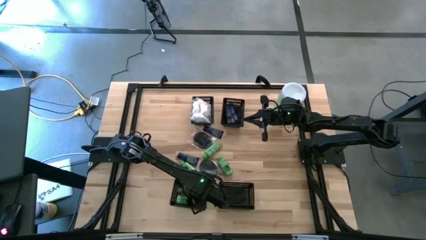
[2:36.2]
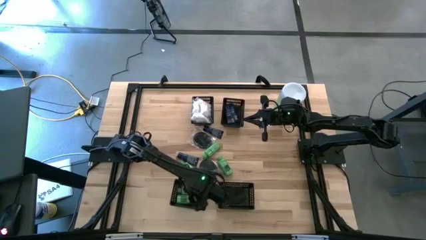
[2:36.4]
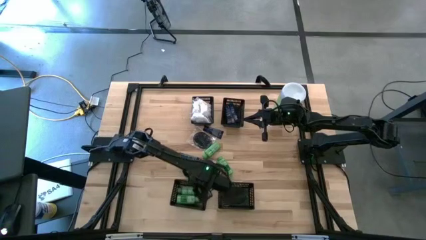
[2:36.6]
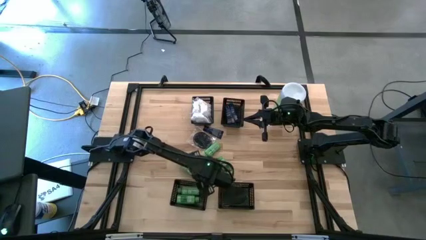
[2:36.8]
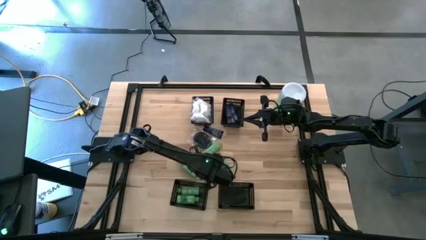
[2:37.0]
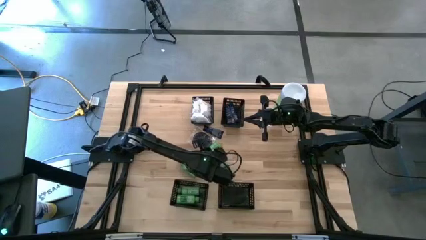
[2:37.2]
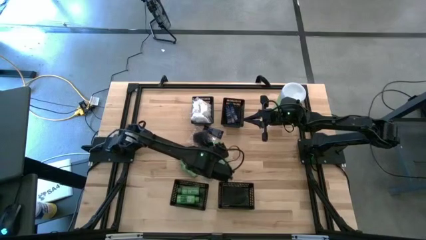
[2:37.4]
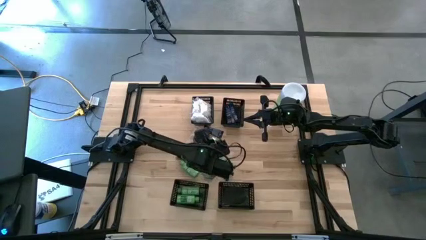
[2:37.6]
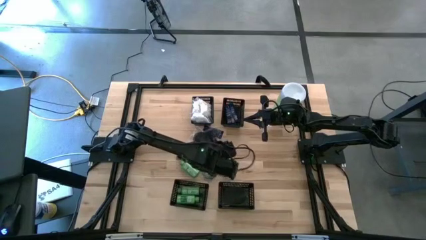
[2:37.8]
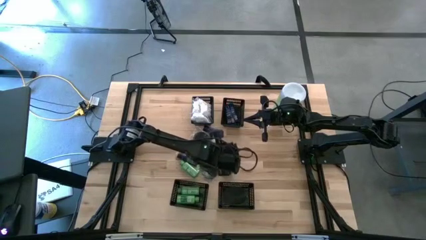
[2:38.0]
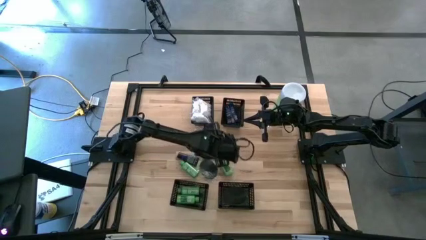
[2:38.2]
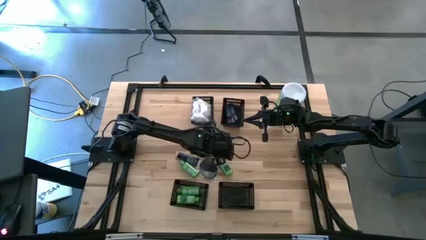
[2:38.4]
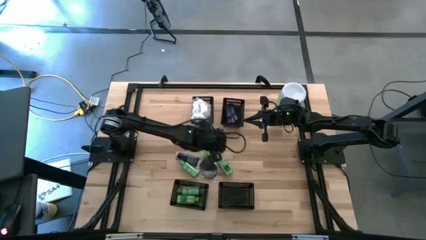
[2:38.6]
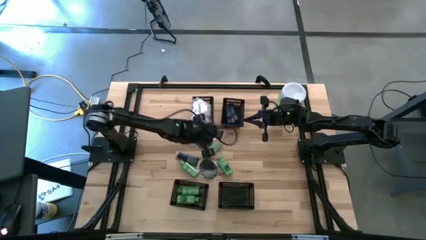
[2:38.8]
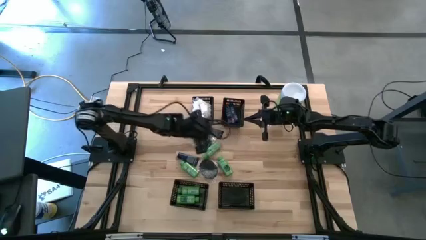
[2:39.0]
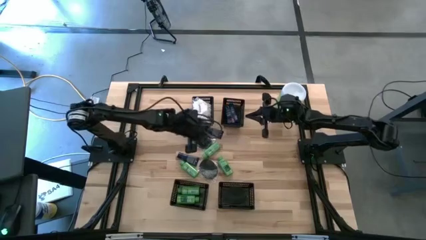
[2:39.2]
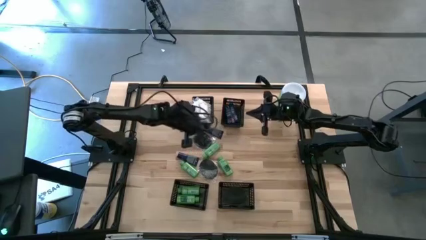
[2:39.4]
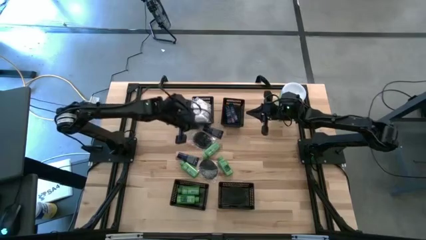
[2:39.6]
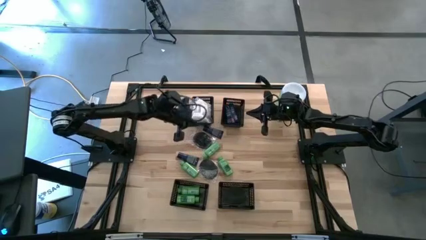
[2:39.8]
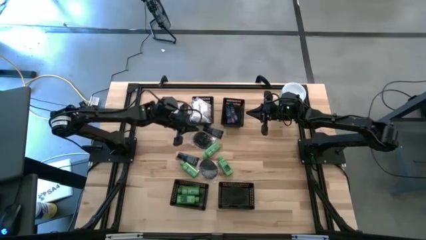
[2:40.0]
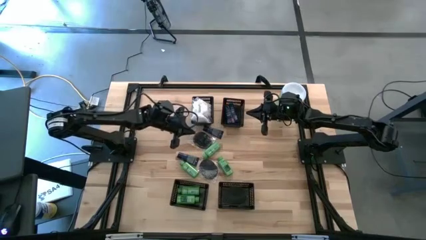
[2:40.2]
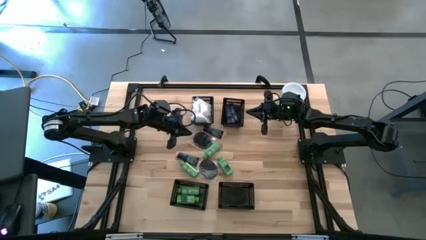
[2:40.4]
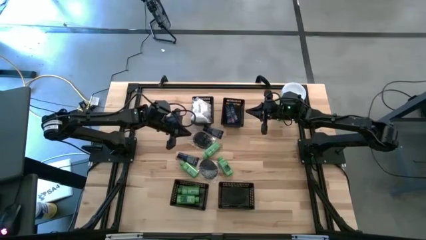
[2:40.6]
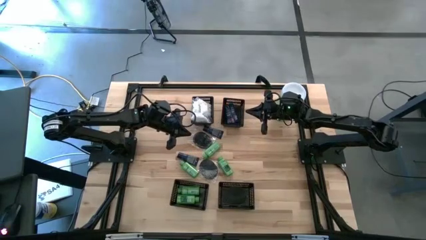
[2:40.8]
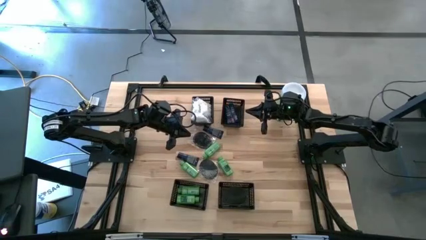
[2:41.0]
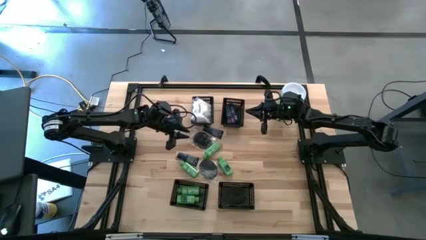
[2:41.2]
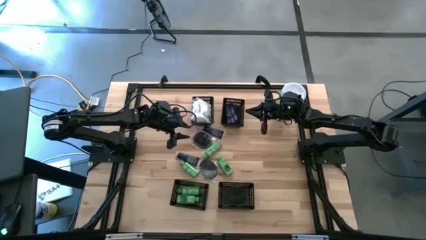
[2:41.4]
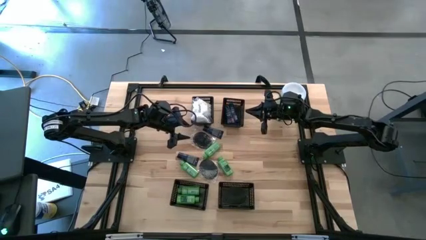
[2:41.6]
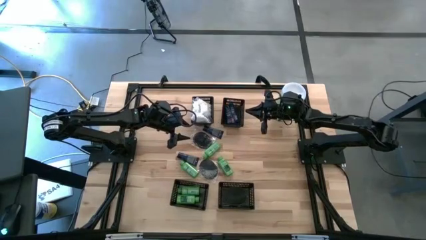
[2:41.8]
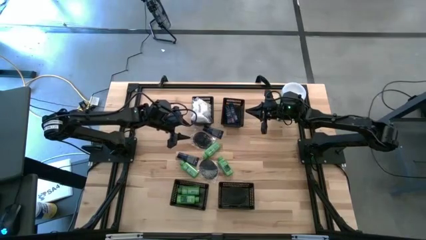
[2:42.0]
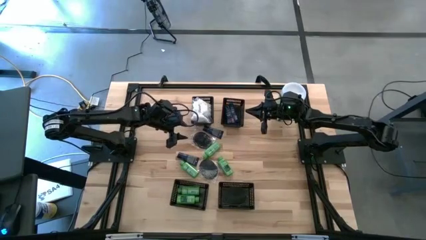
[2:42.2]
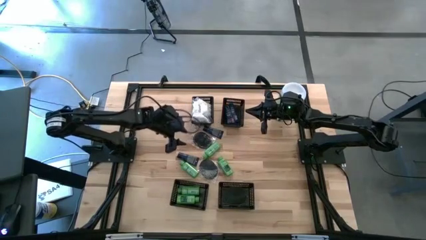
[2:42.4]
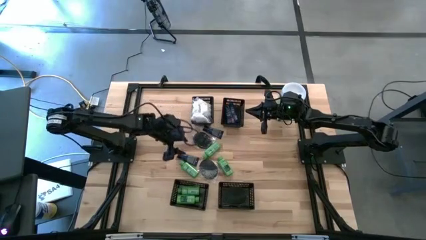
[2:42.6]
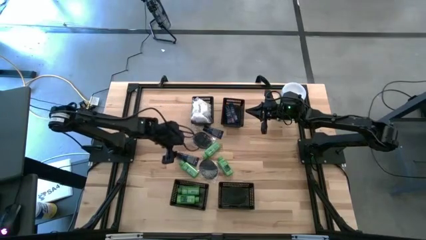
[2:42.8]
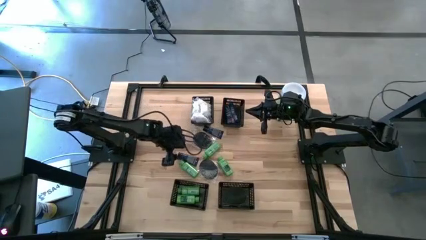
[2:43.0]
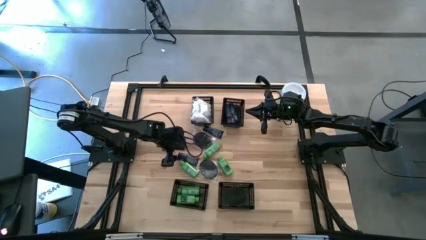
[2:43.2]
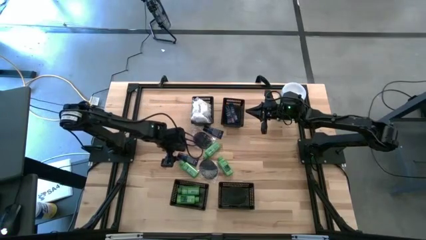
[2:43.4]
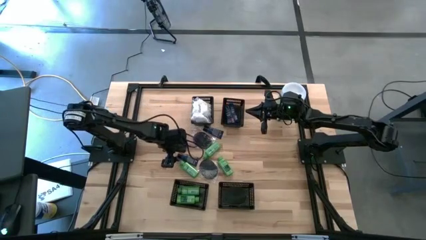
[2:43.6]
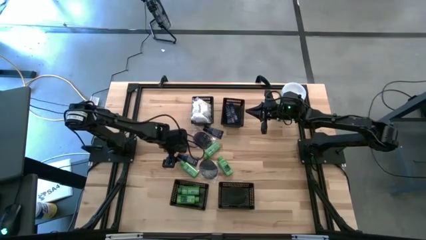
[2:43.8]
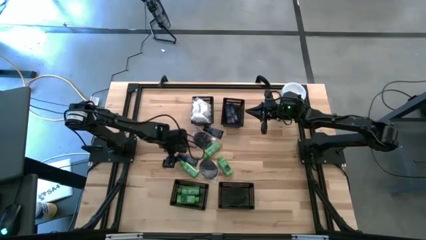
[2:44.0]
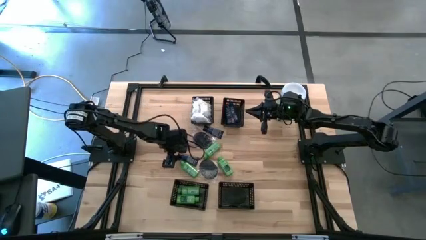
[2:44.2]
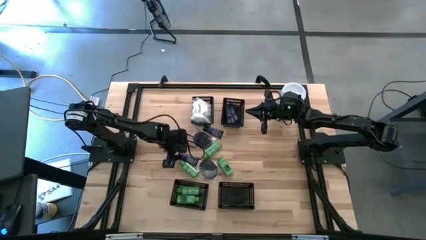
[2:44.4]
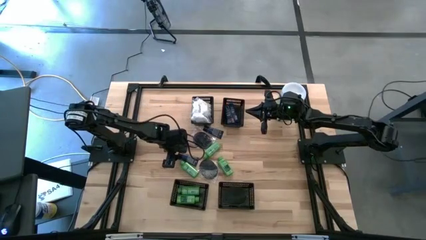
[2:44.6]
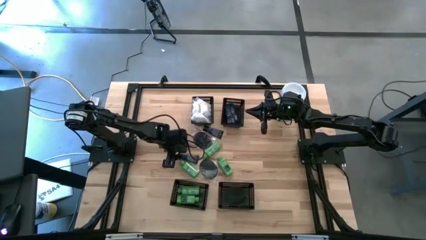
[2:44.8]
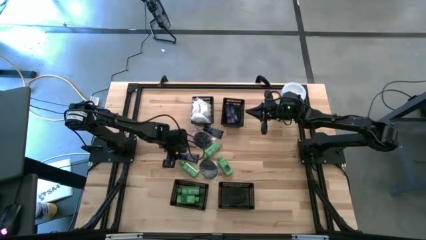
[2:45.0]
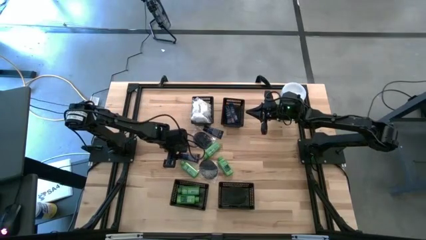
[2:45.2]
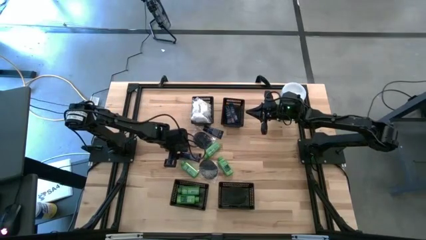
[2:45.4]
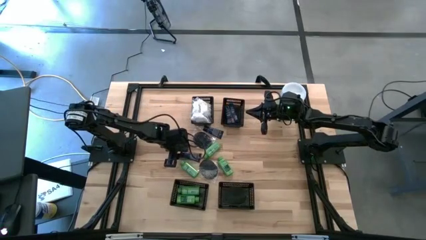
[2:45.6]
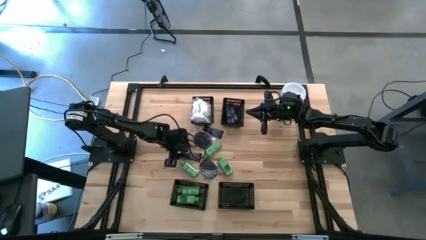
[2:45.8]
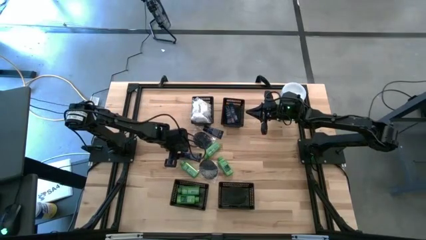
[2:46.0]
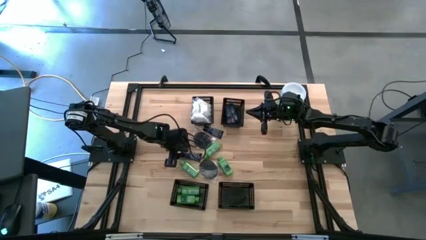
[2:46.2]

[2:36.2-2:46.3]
Task: Pick & Place Travel size toiletries
Put the blue shave cream into the top right black bin

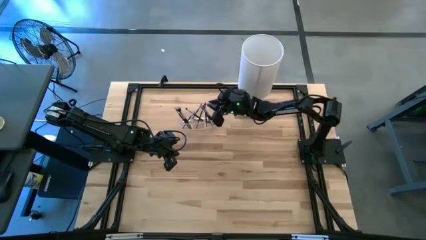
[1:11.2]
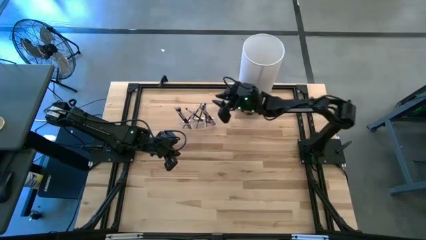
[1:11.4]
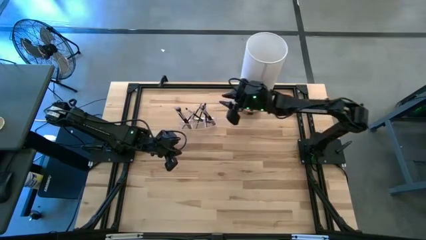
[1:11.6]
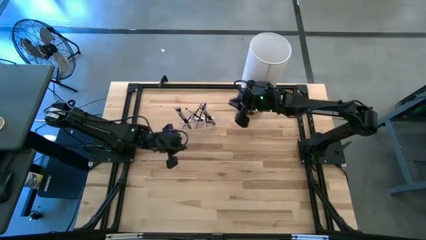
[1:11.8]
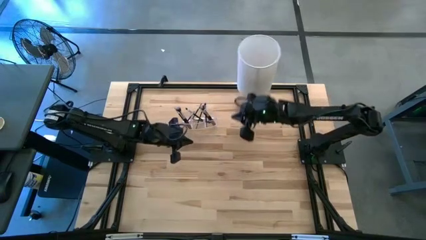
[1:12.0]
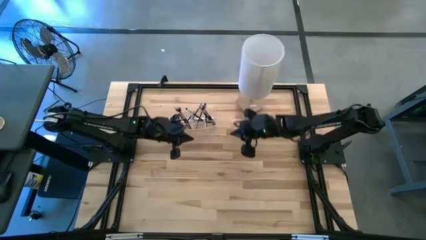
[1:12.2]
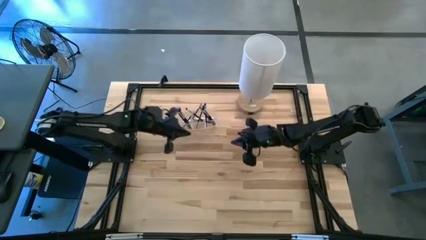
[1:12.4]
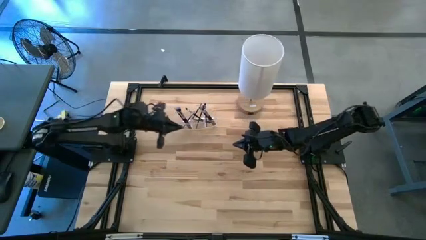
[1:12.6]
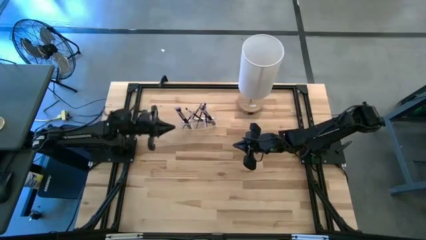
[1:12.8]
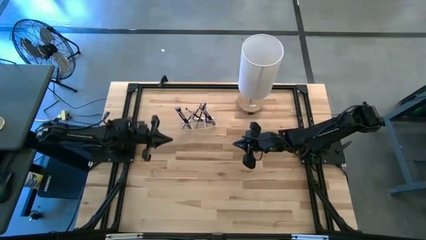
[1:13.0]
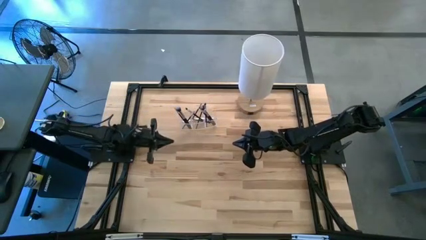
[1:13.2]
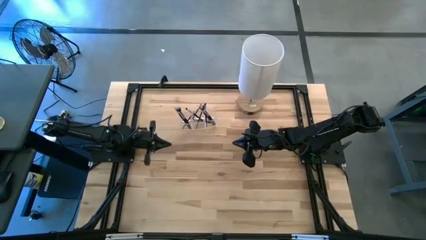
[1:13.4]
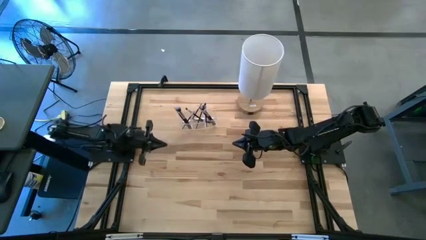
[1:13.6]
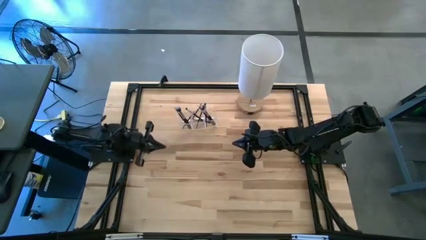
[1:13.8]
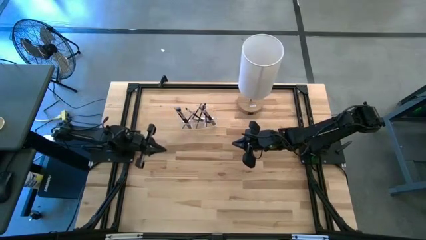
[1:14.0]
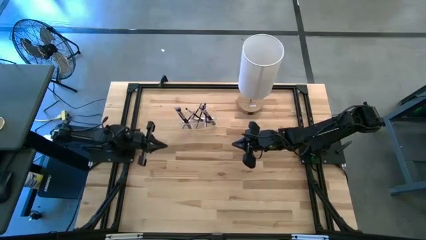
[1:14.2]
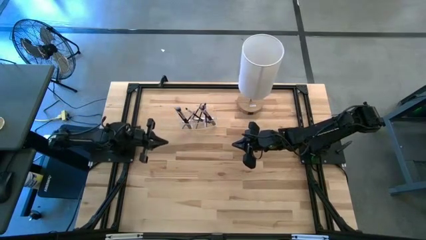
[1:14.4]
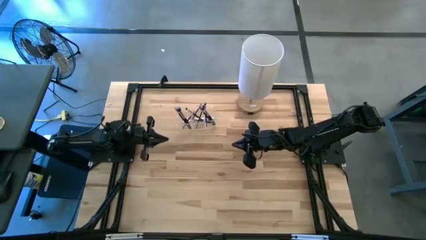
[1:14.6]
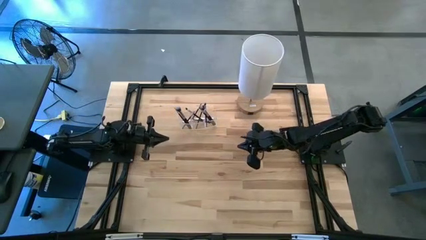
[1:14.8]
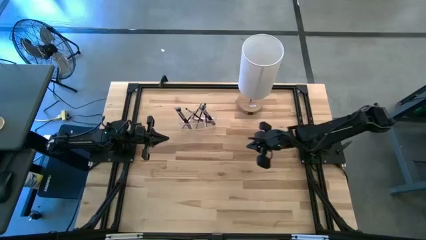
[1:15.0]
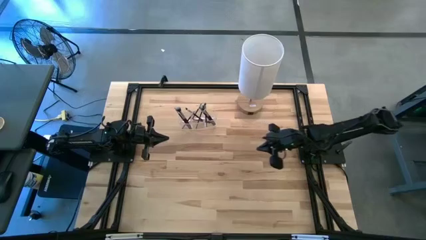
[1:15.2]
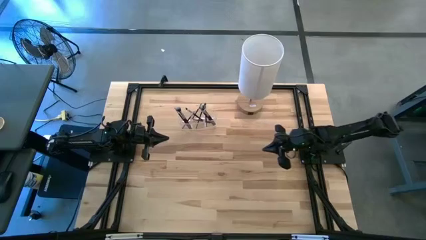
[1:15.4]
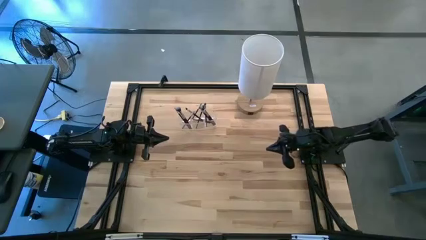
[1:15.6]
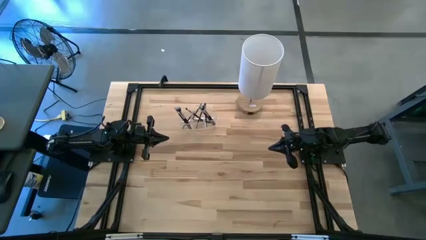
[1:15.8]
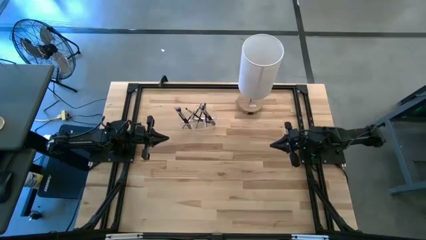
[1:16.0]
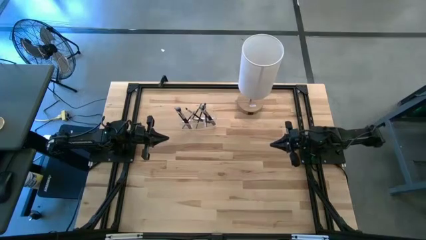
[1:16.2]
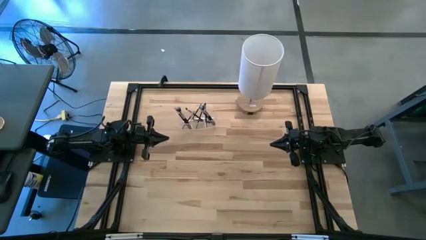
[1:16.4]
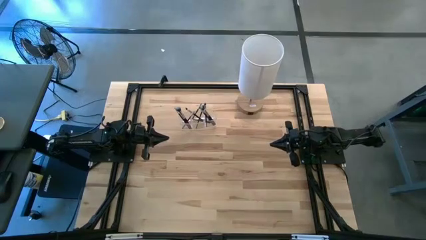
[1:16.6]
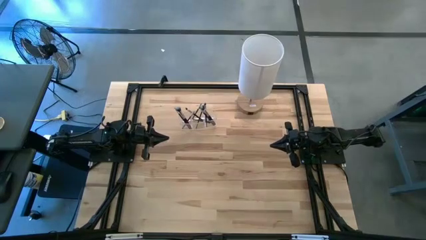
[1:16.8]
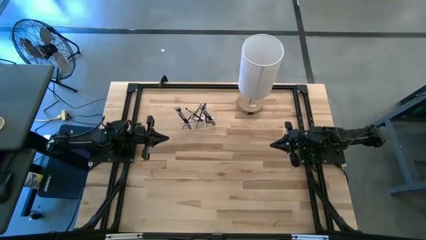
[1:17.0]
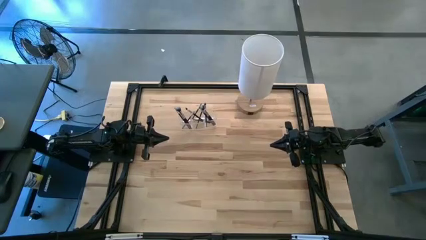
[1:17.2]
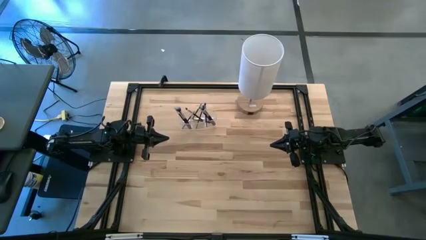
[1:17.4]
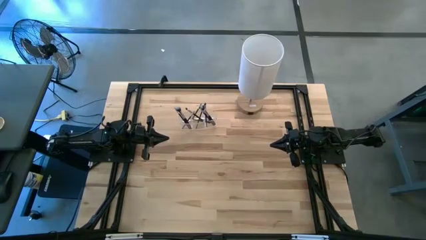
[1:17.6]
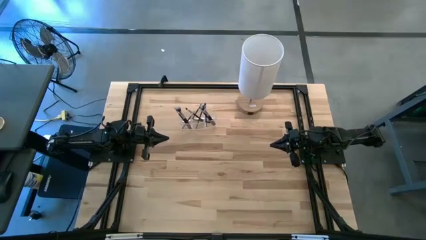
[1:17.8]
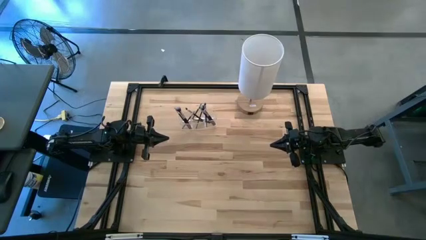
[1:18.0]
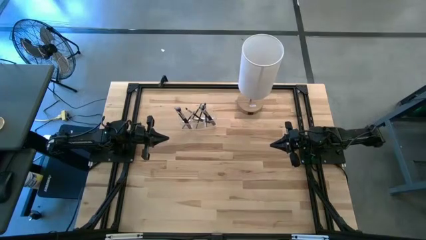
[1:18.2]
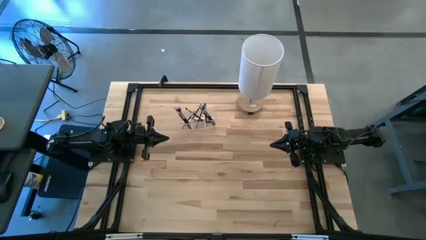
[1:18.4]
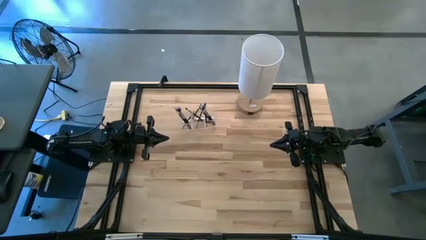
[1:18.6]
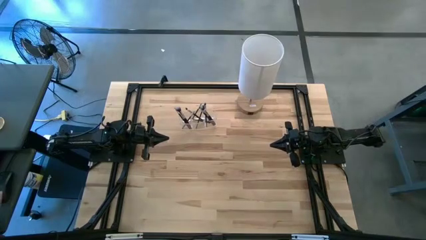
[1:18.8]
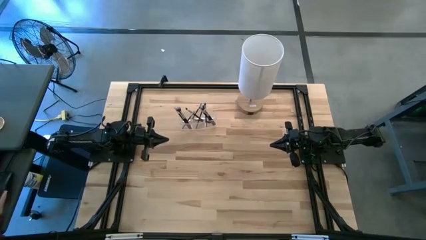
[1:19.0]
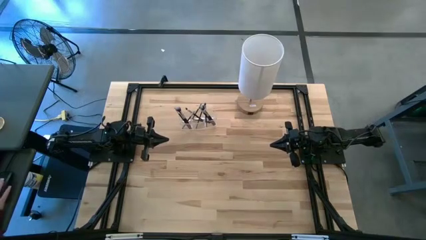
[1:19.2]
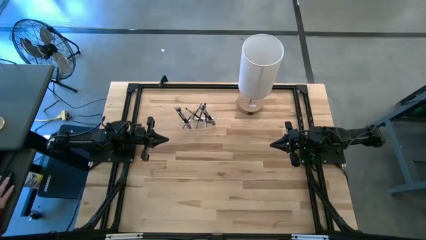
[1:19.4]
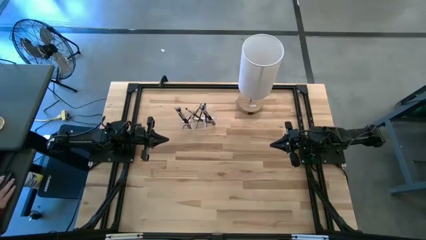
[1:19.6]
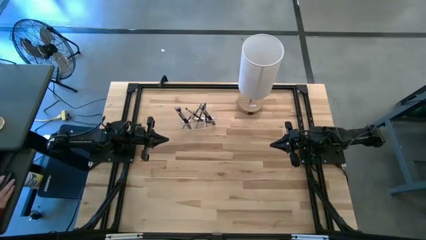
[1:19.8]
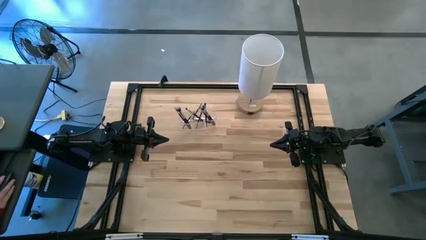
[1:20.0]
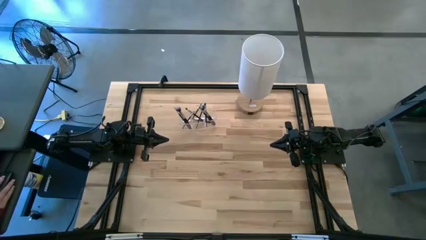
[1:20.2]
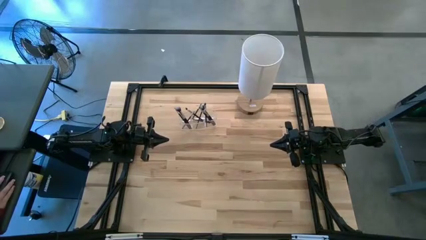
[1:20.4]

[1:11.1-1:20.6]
Task: Put items in baskets/containers
Return to Home Position
